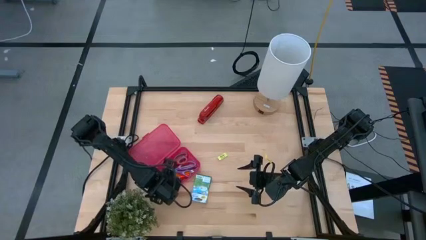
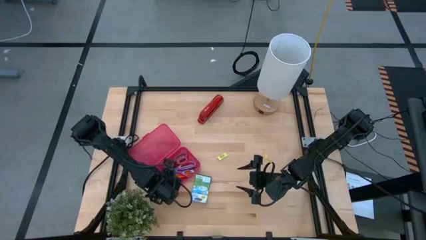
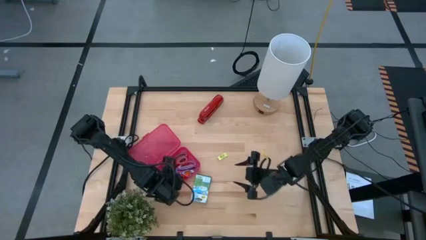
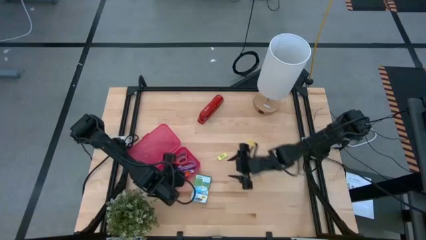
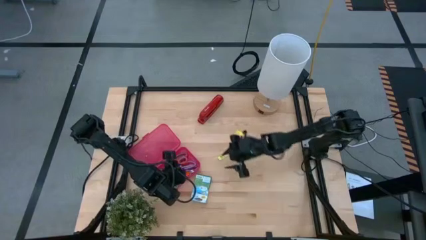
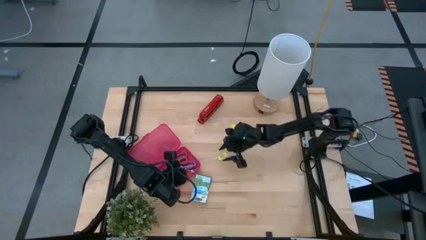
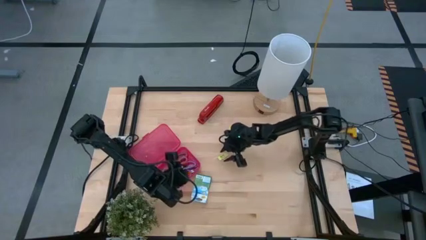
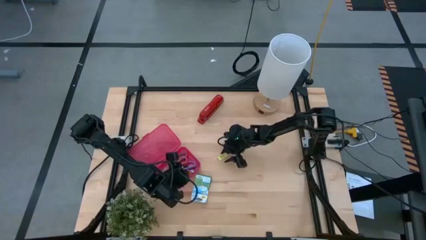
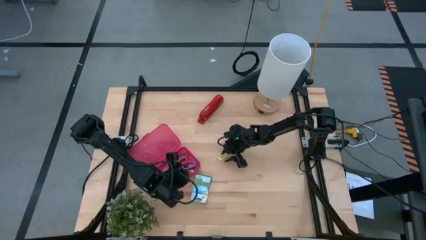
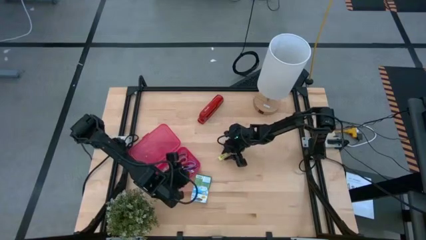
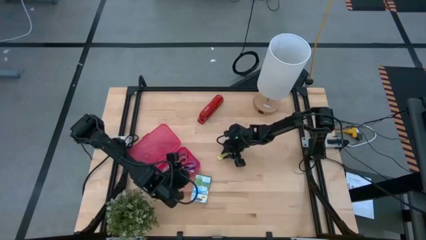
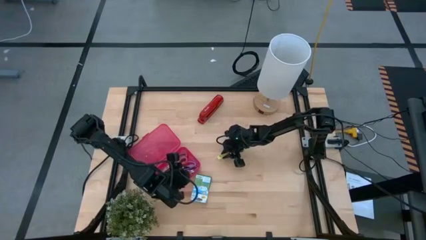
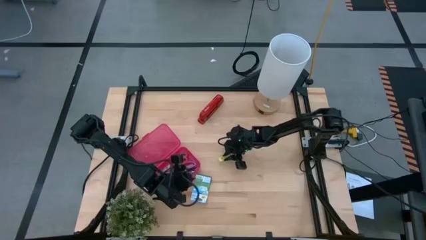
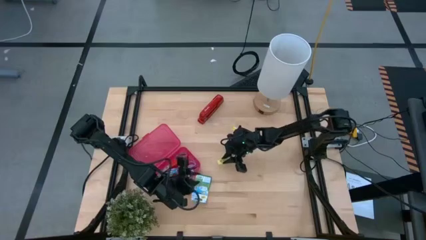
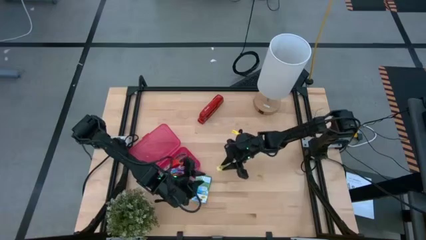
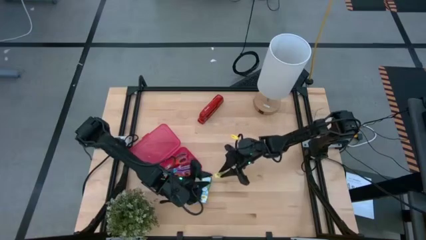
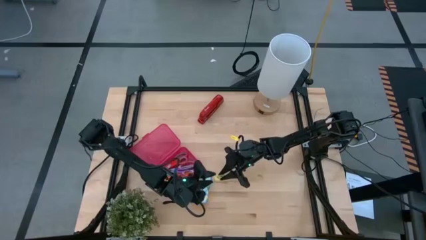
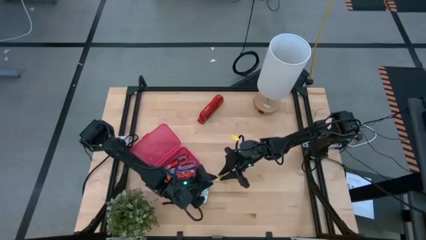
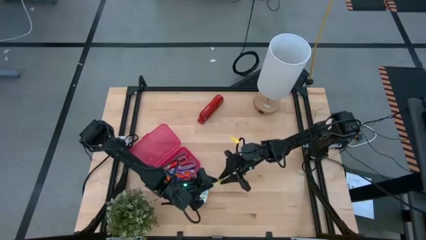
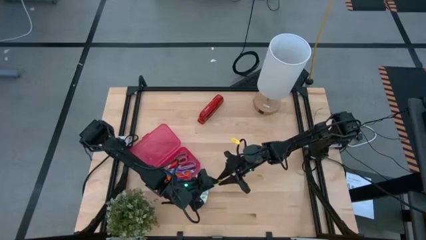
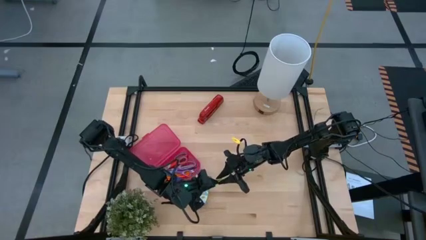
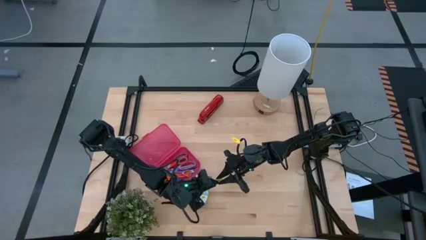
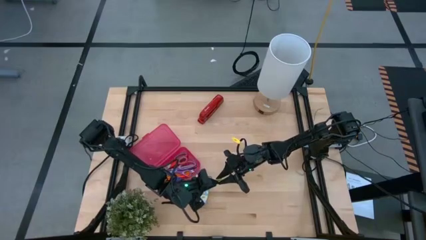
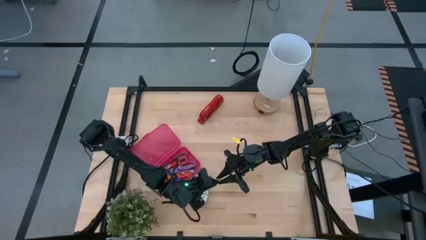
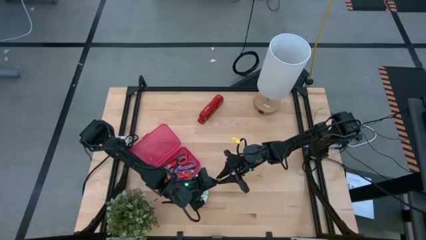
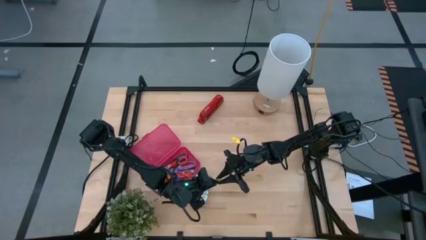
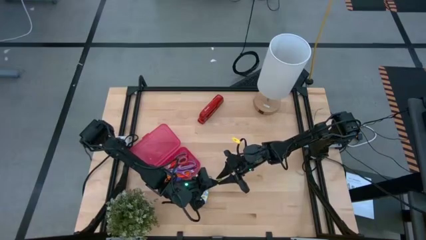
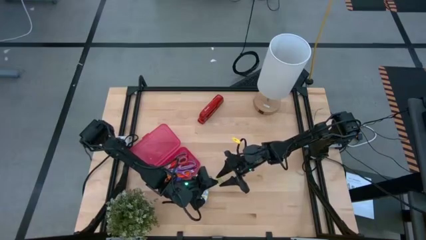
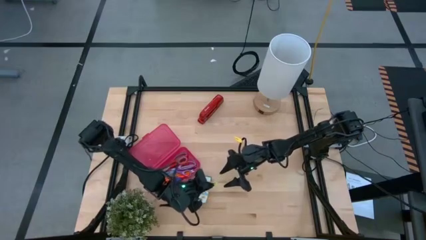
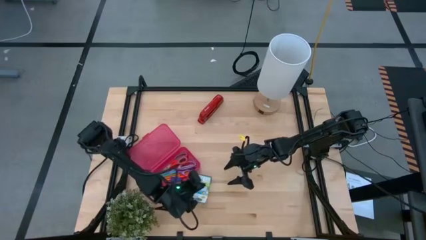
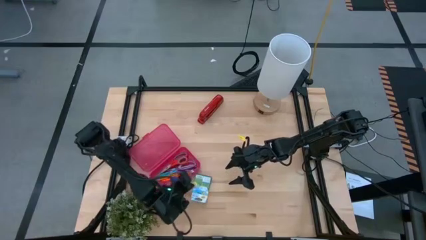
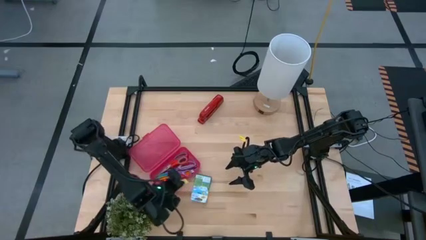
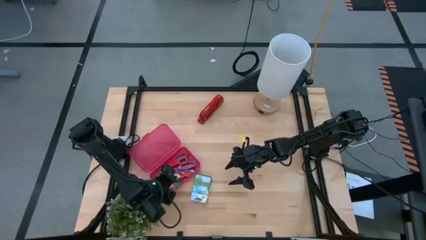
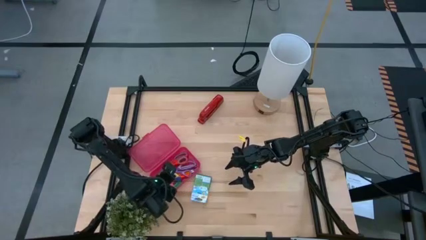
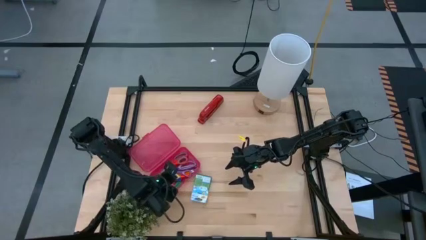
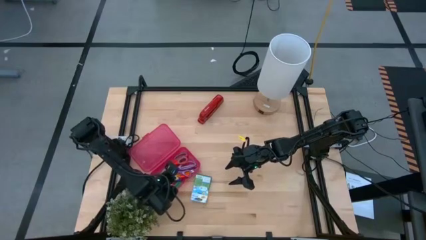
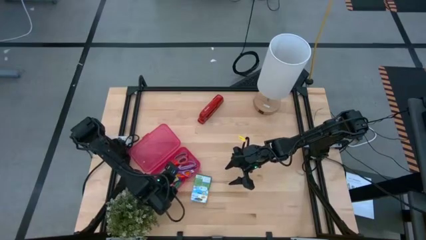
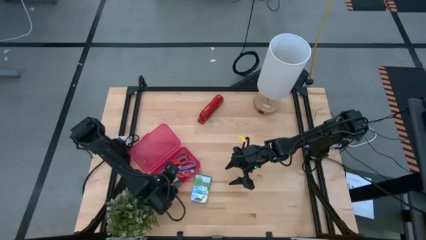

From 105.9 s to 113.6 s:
Task: Pack school essentials
Put the yellow eraser into the red supply box

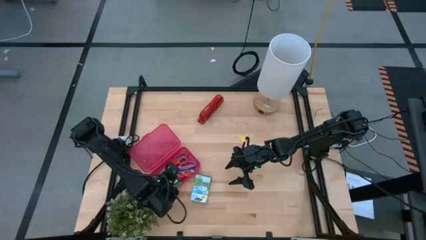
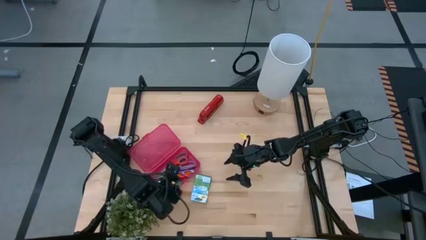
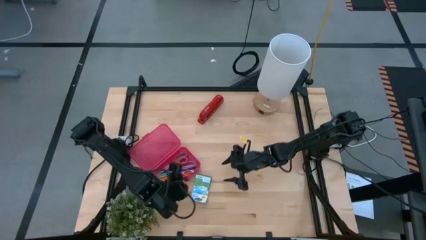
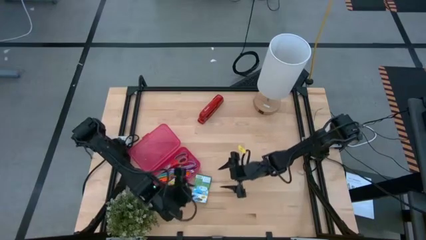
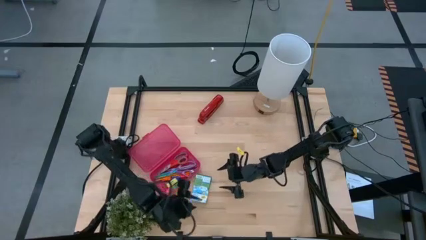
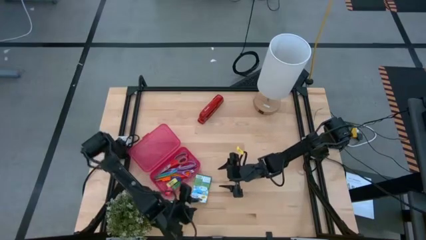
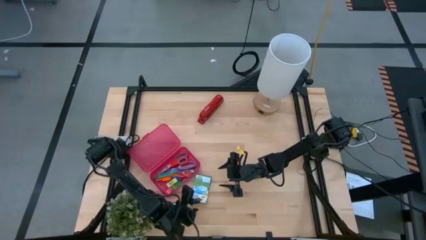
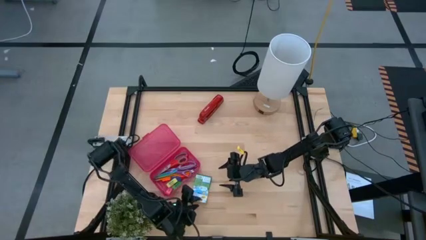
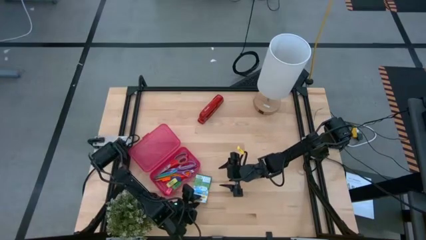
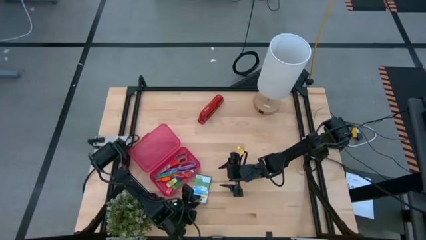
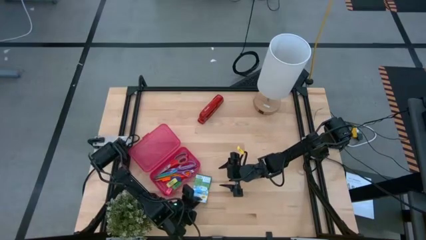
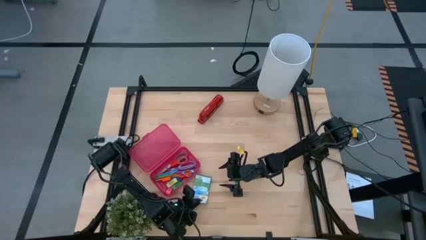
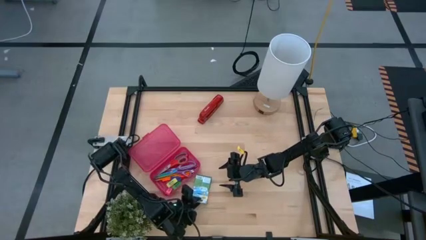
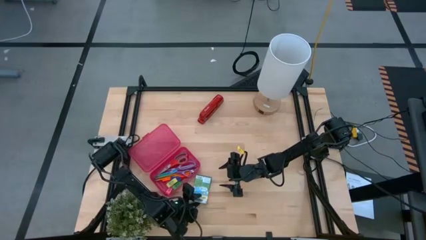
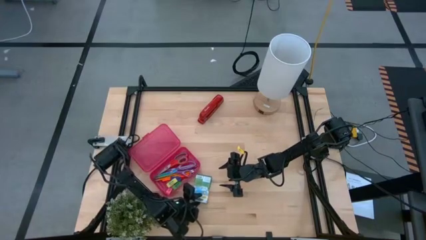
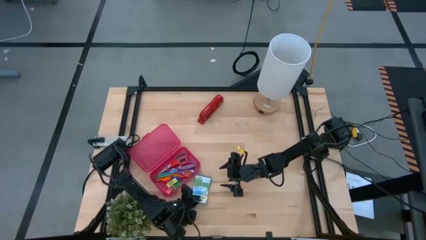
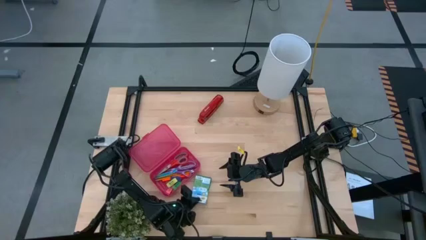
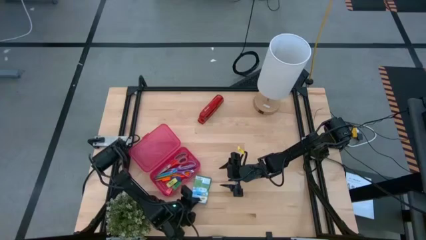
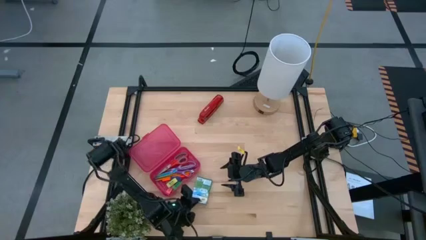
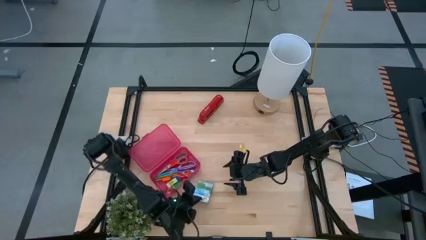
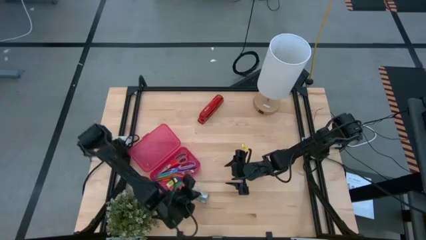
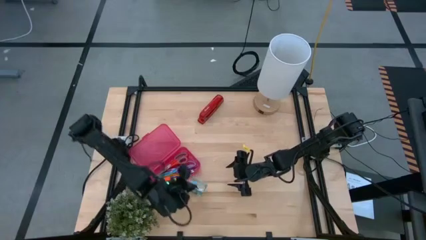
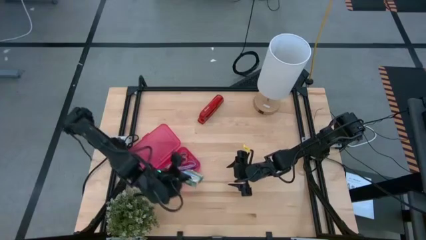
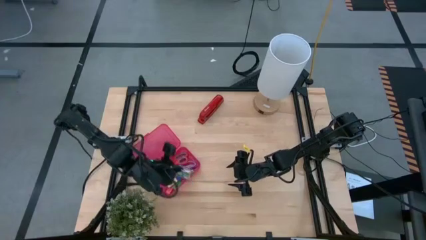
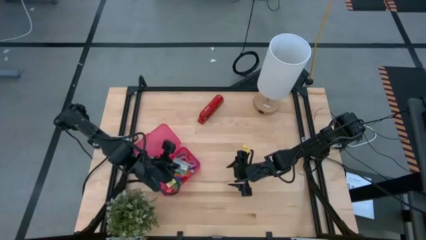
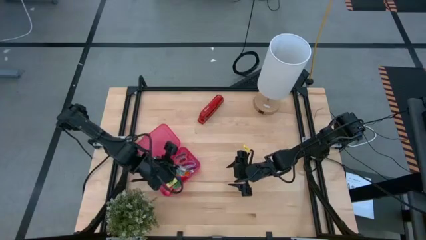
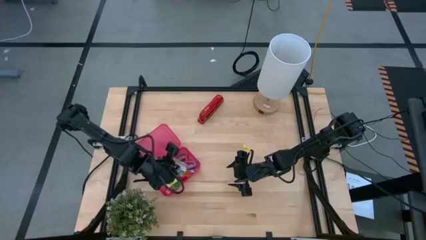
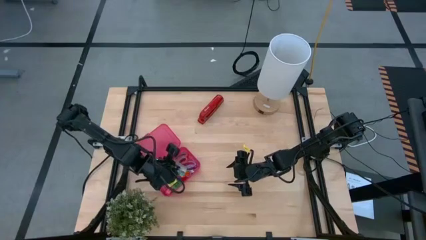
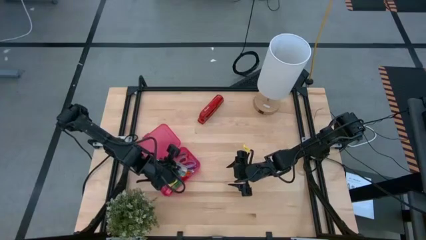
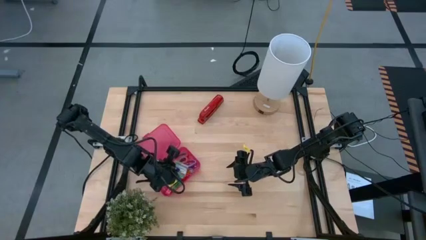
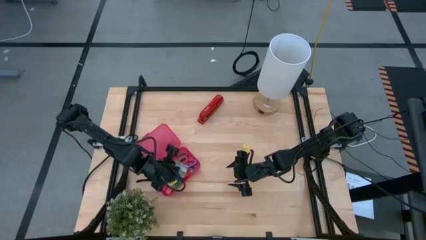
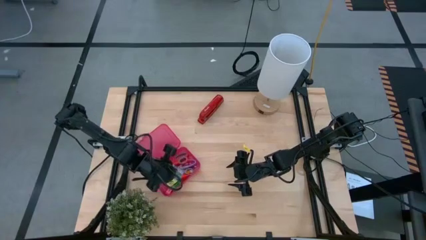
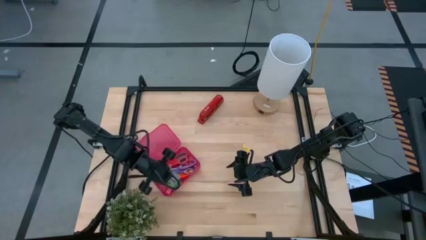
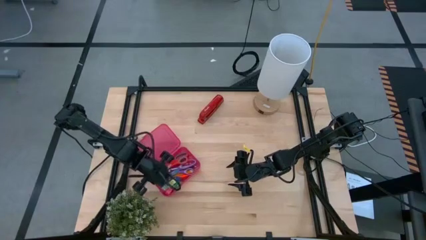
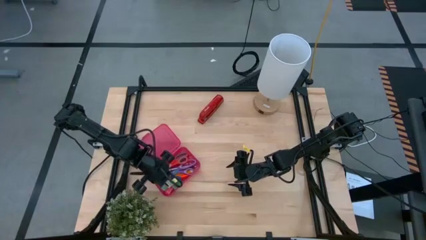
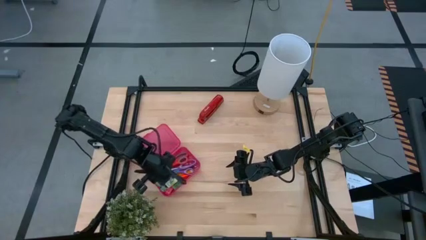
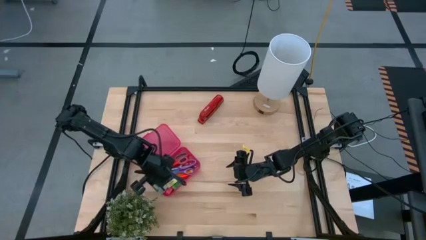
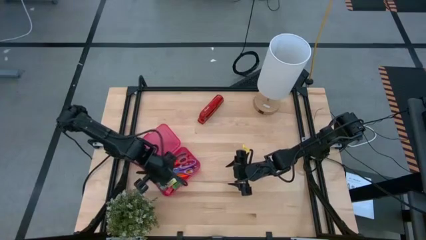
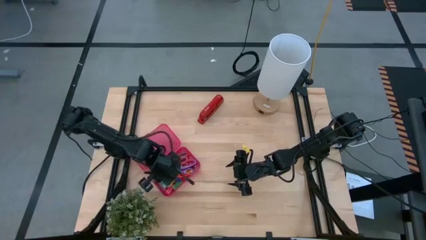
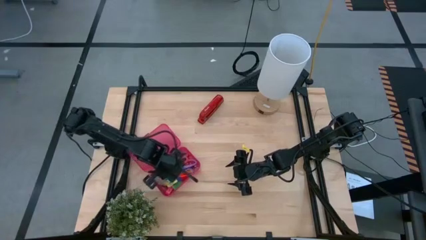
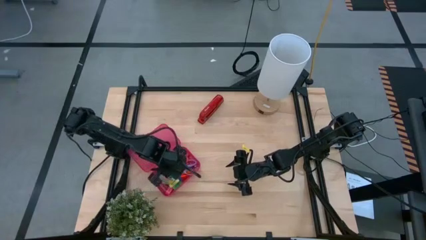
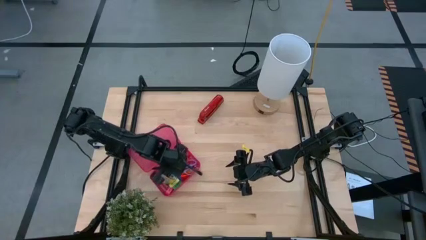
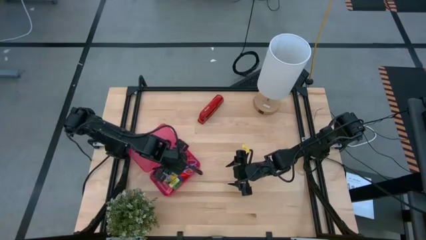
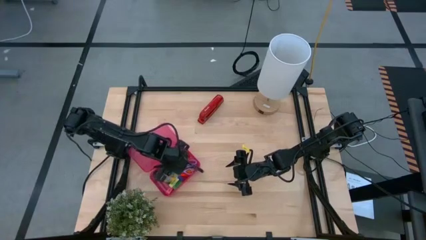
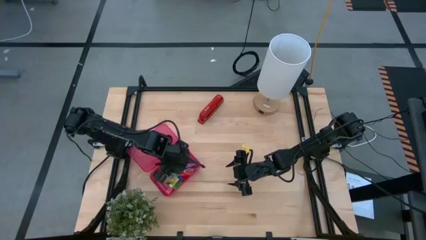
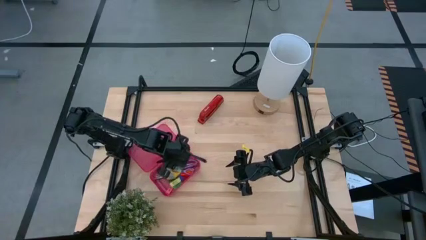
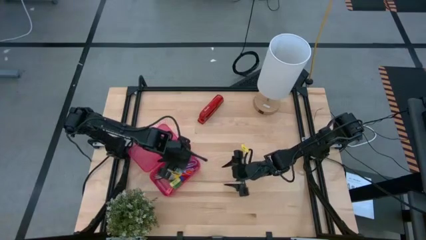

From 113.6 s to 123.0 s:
Put the crayon box into the supply box
